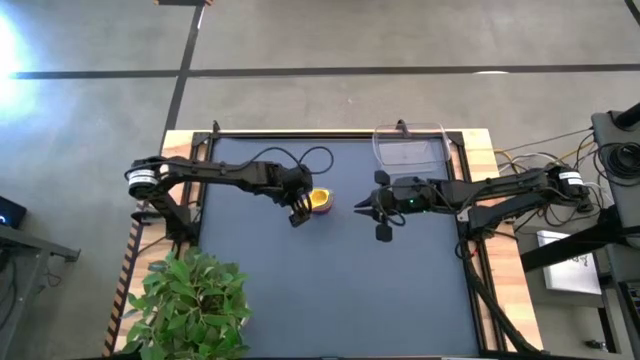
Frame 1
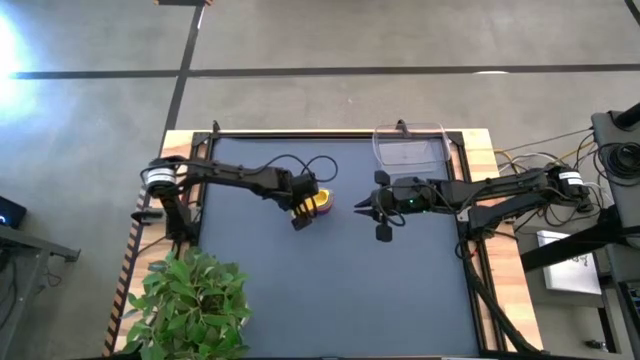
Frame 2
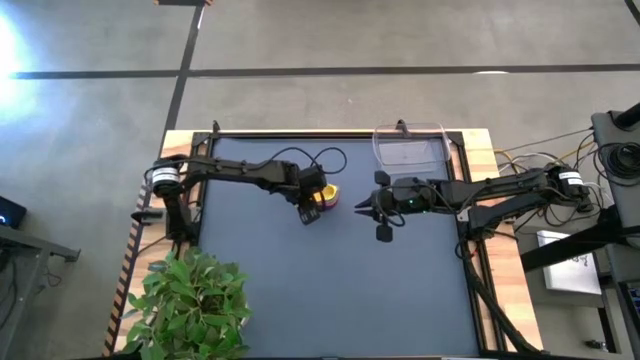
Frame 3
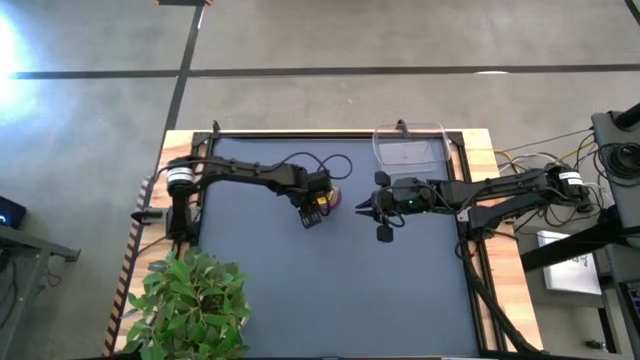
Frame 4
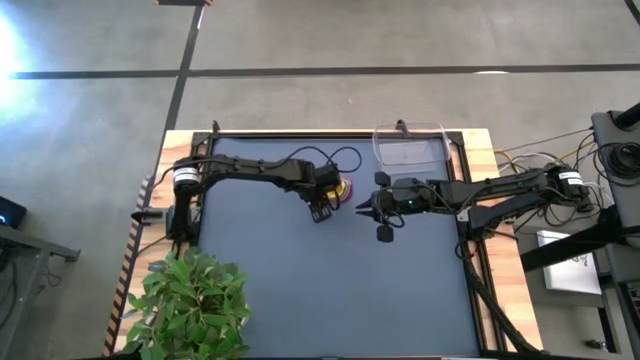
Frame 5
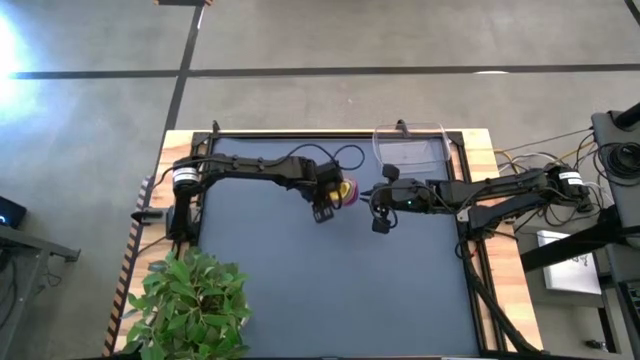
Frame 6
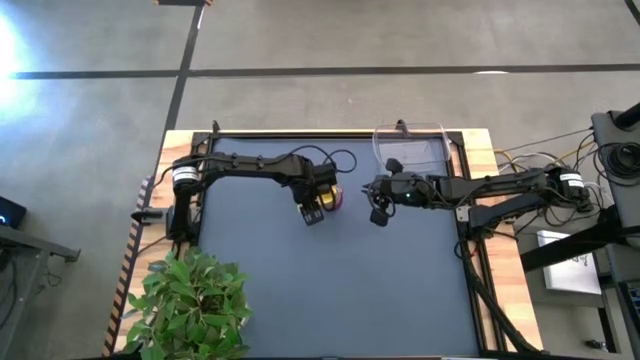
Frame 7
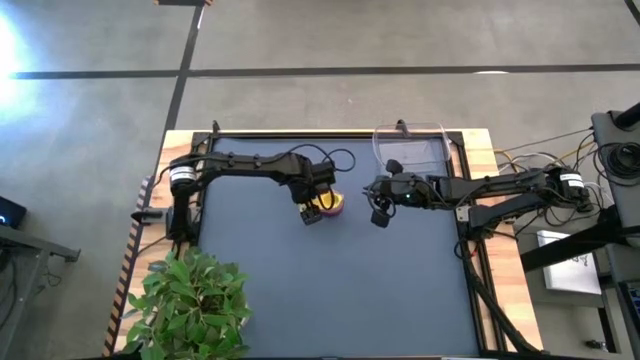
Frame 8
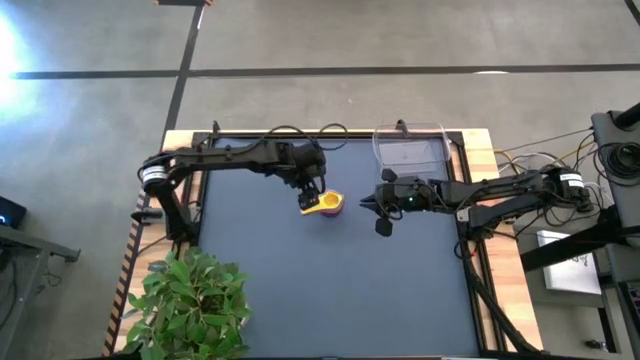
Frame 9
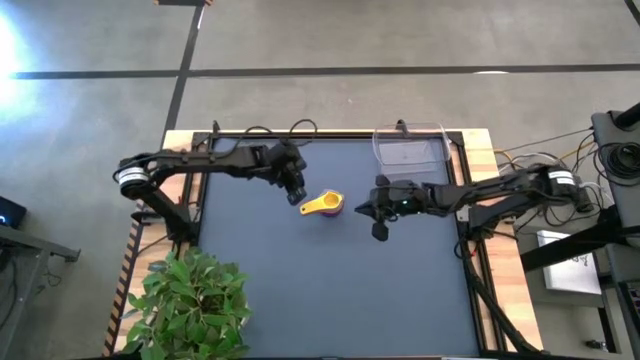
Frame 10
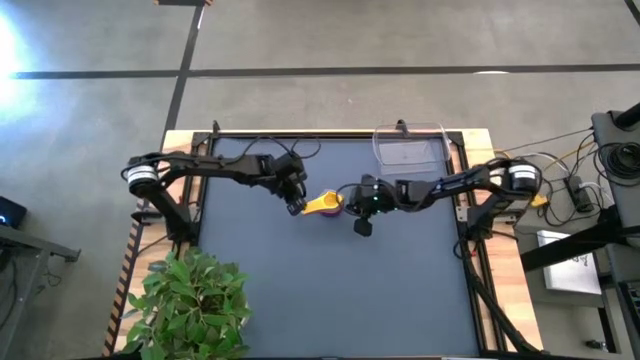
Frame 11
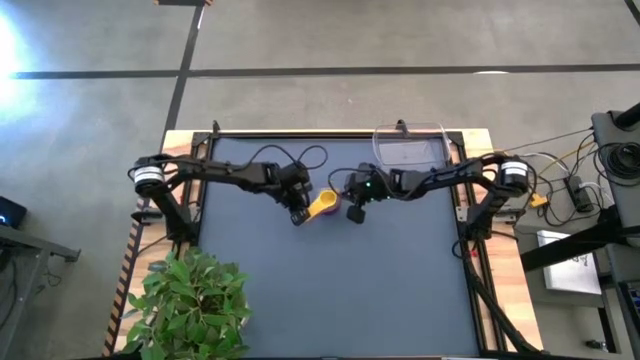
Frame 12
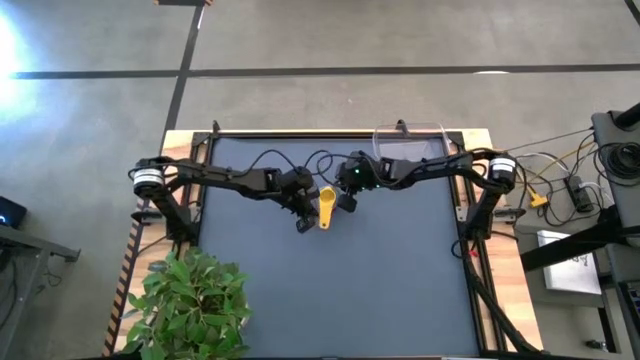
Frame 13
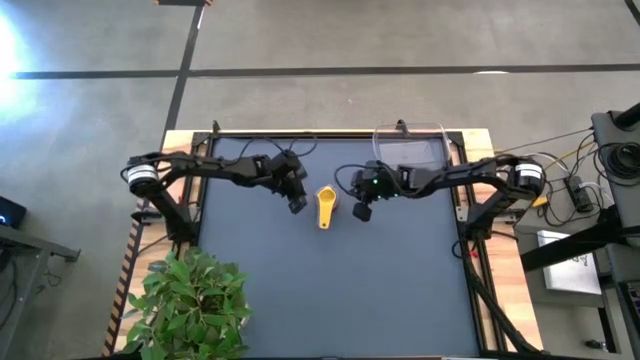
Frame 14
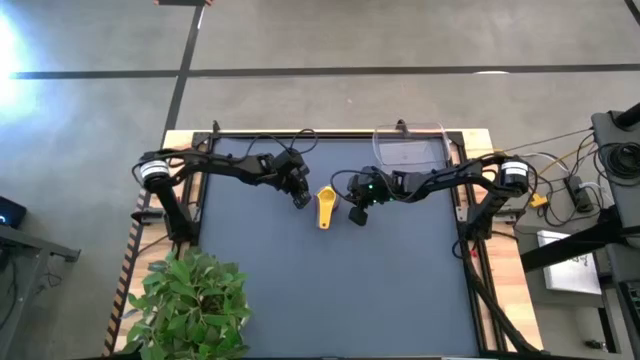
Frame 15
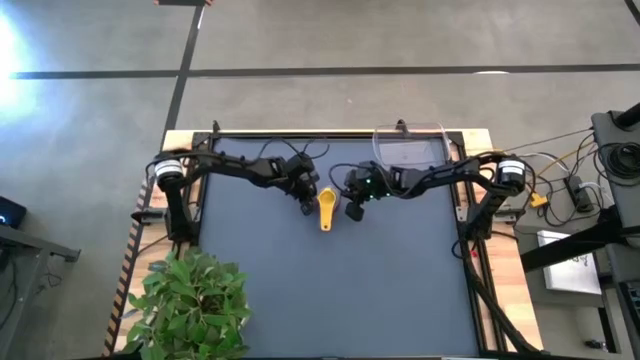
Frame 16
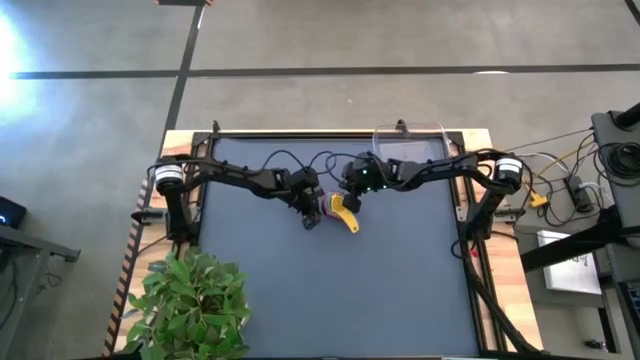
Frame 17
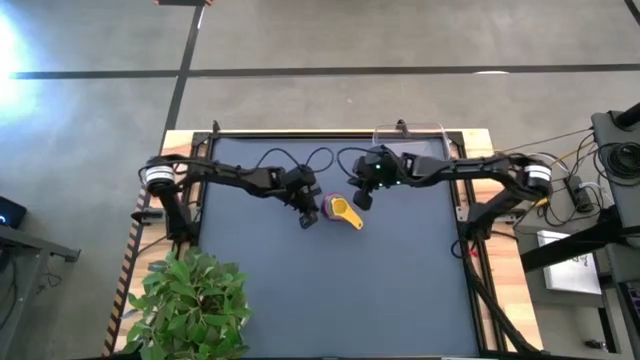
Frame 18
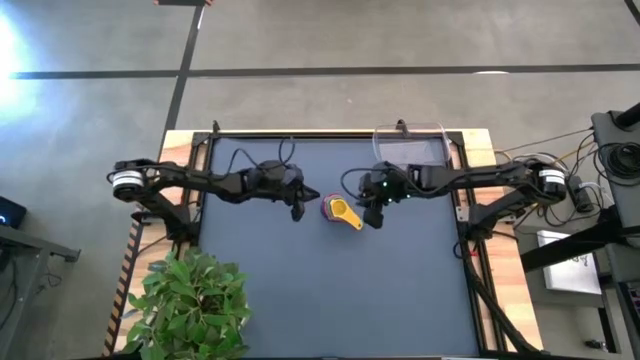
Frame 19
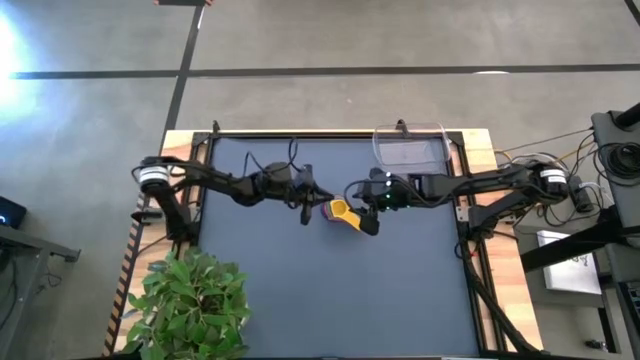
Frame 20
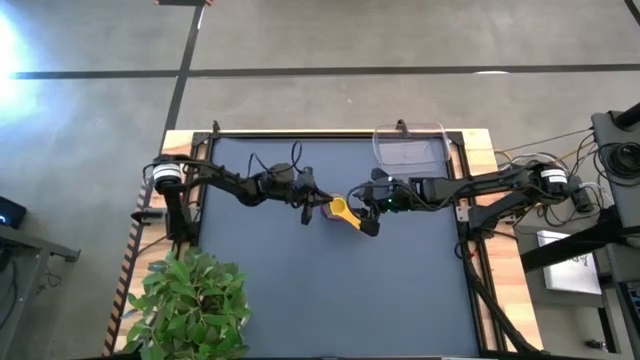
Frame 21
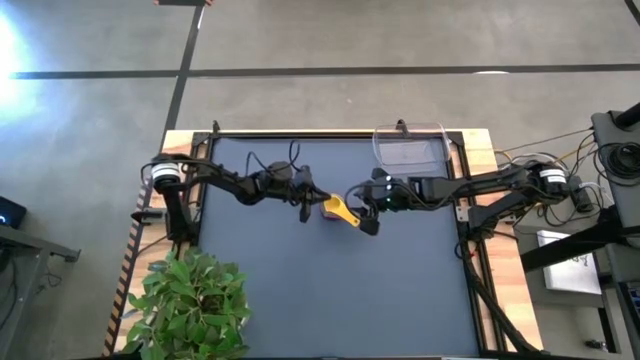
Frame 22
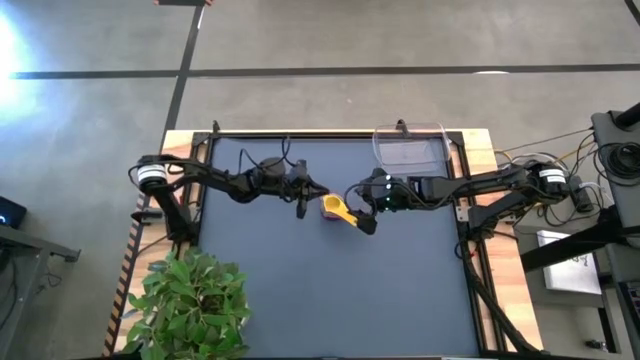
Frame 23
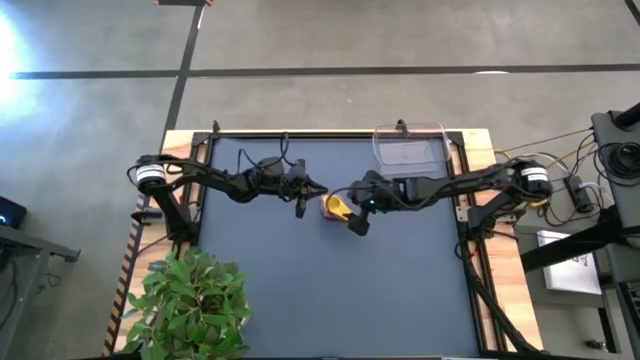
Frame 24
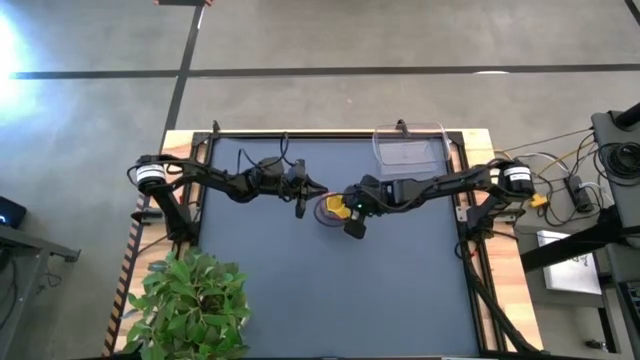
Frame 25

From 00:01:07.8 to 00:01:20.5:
Task: Nest measuring cups in basket
Adjust the stacked measuring cups on the table

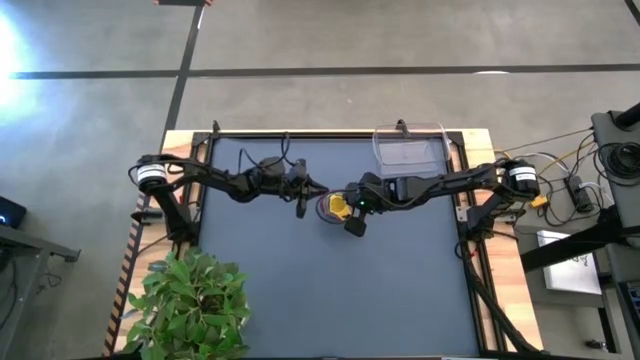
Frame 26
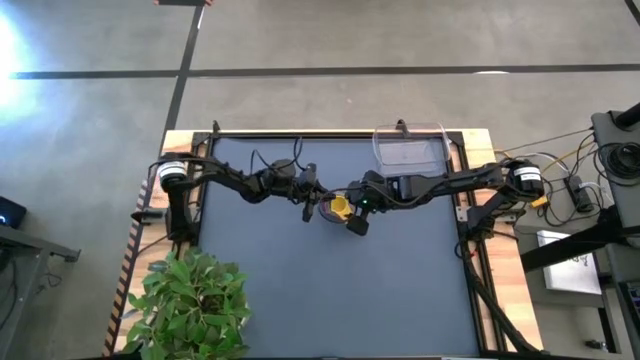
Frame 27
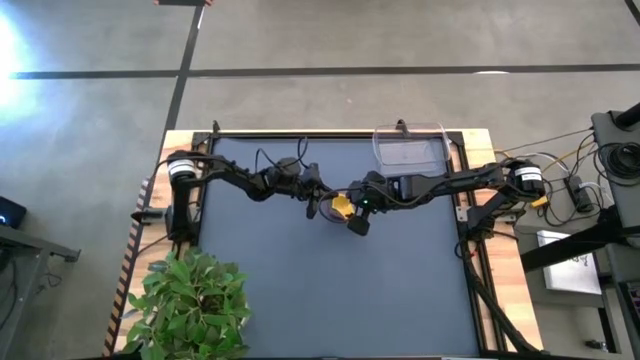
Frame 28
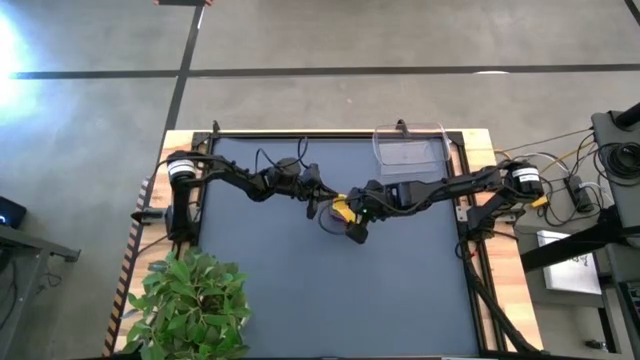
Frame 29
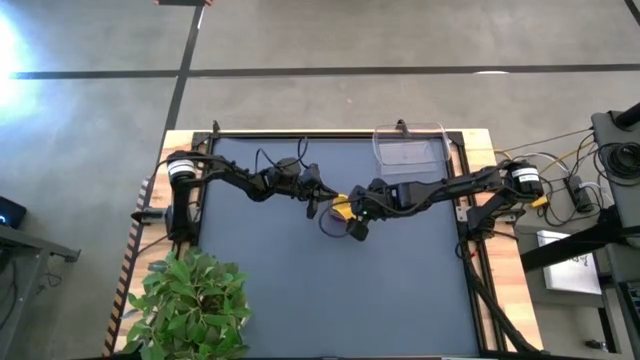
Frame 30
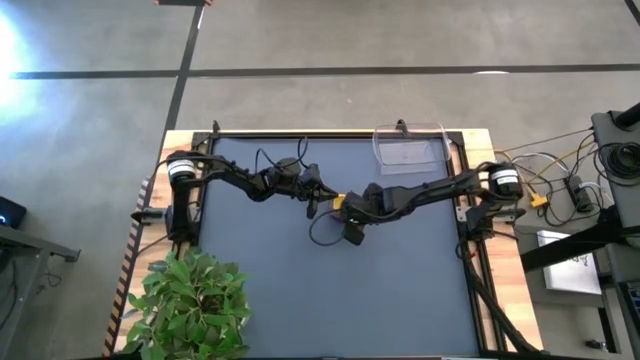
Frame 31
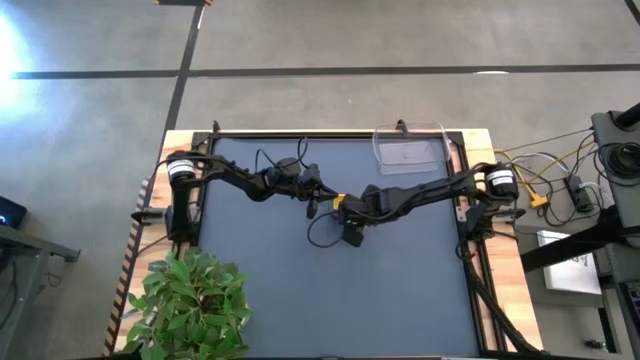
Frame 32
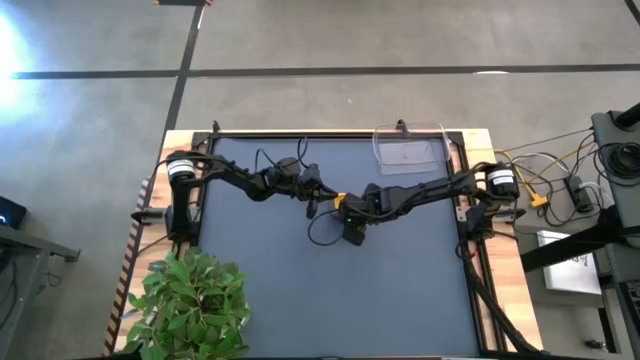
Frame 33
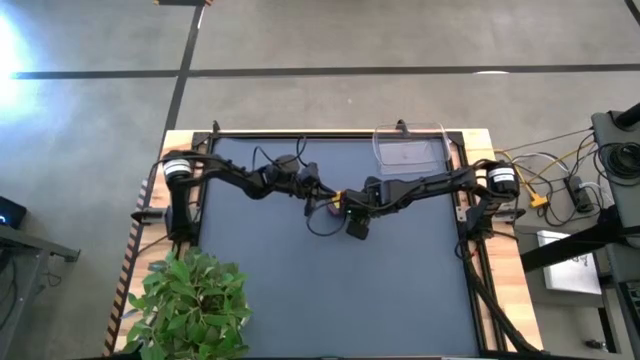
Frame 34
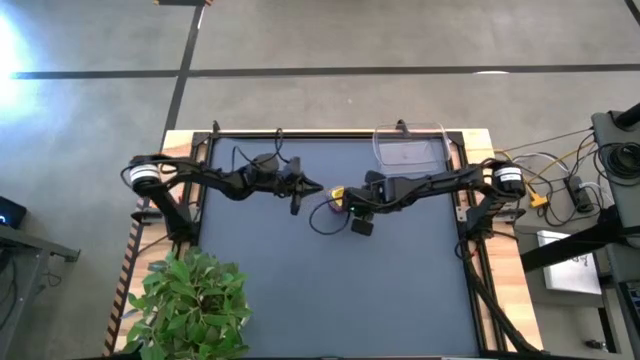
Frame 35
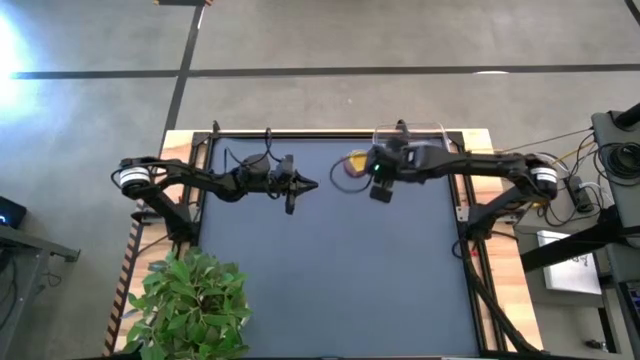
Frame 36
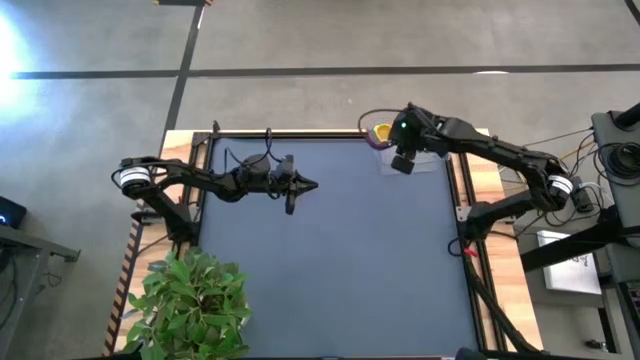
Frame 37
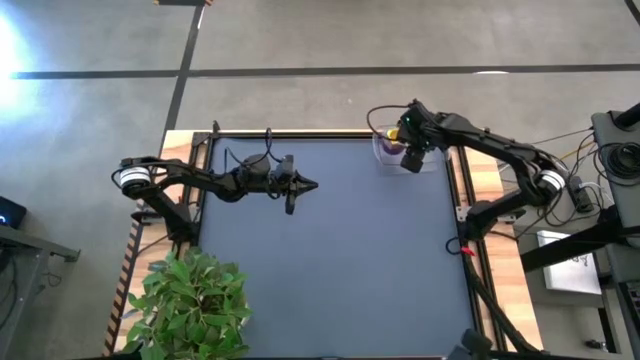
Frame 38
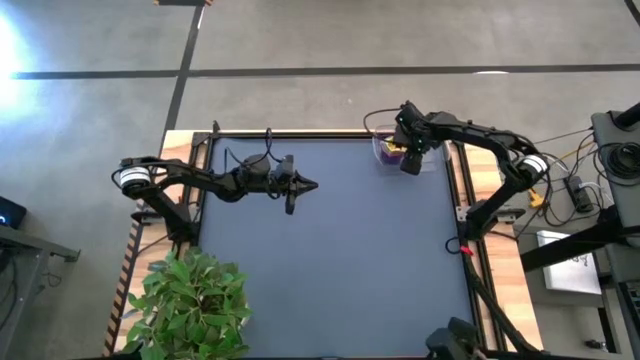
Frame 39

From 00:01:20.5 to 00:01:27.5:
Put the stacked measuring cups into the transparent bin

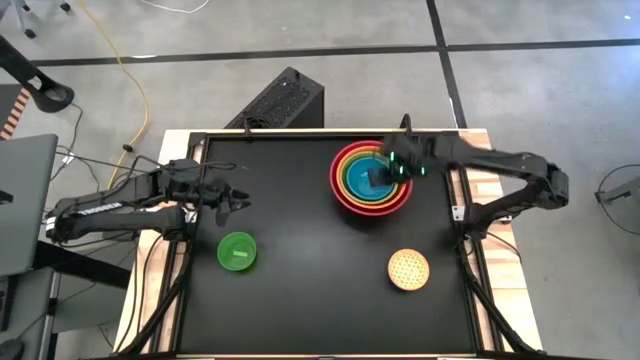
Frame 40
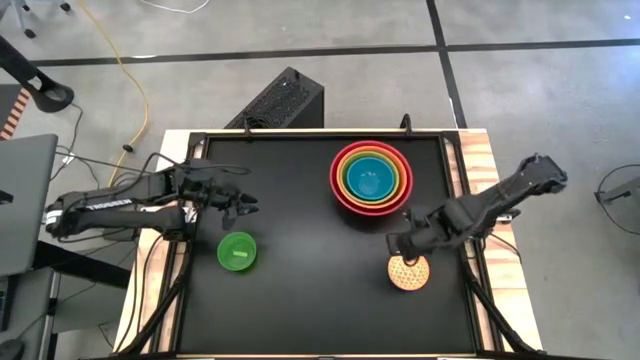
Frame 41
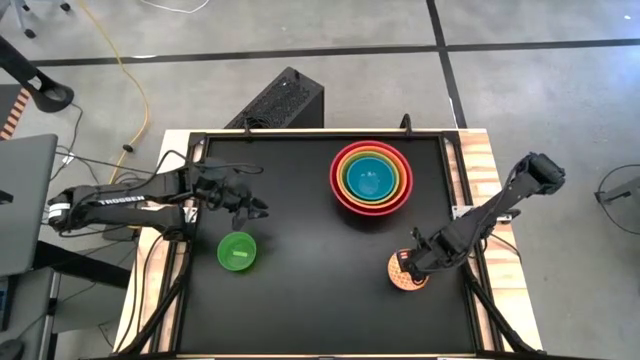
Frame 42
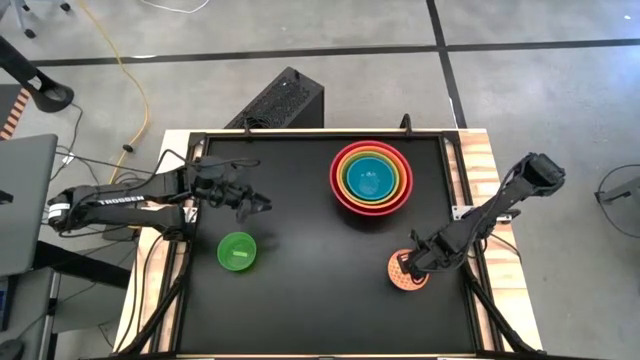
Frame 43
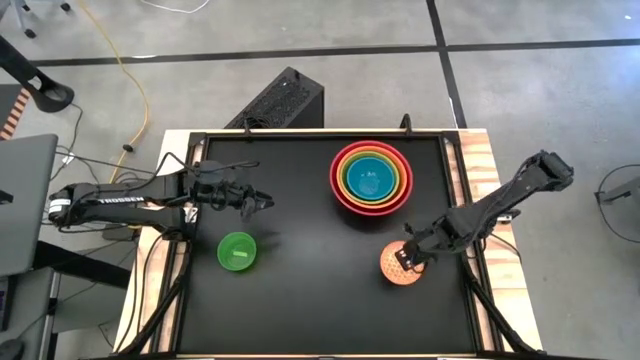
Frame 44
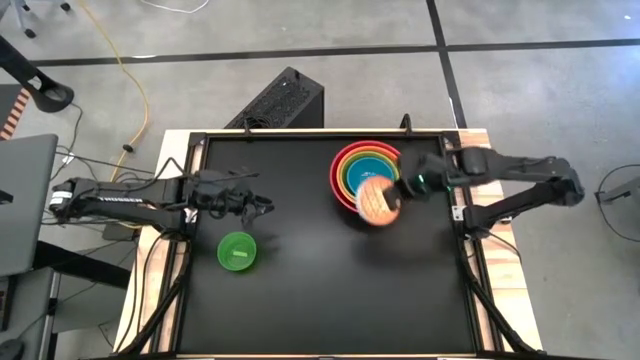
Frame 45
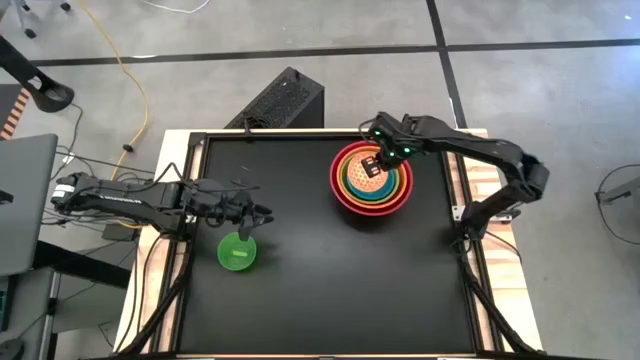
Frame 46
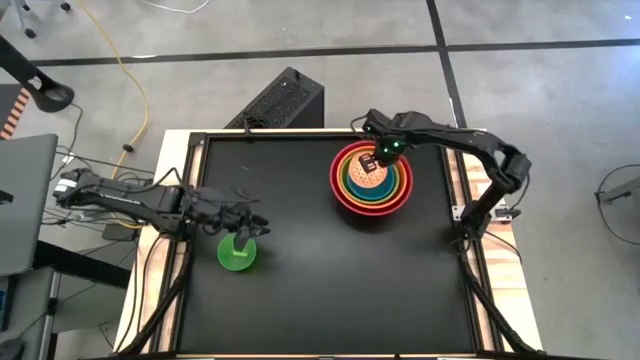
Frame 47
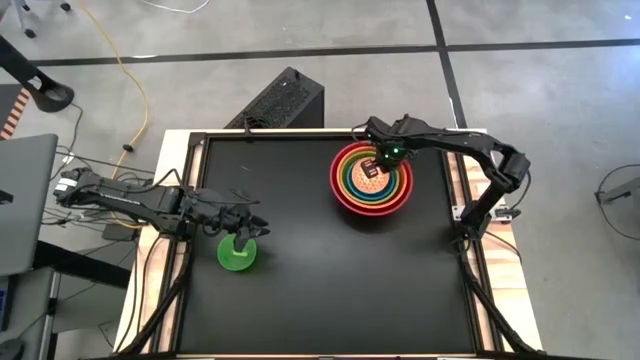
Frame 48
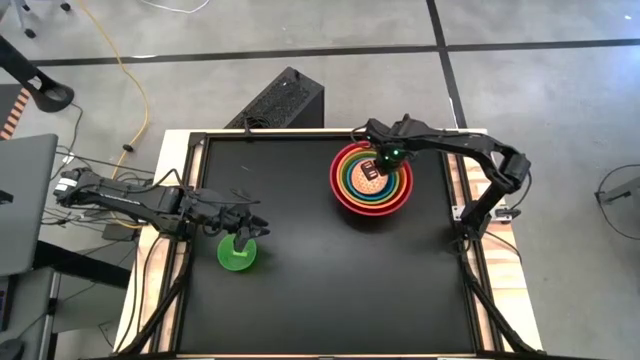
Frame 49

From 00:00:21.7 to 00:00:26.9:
Task: Nest bowls inside each other by size order
Stack the orange patterned bowl on top of the blue bowl
